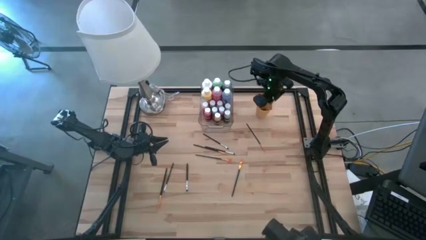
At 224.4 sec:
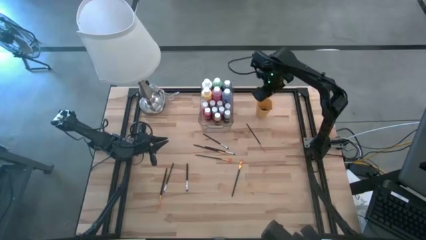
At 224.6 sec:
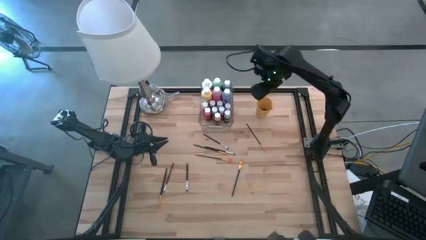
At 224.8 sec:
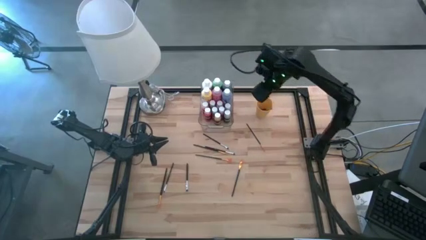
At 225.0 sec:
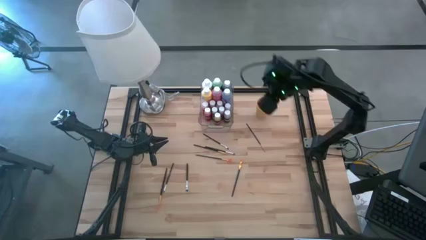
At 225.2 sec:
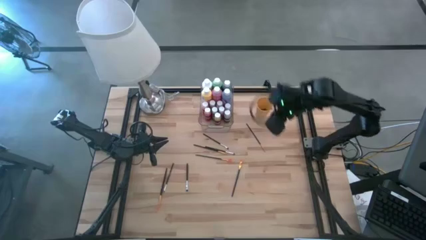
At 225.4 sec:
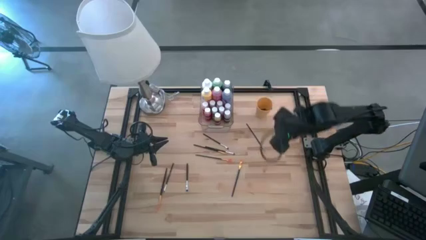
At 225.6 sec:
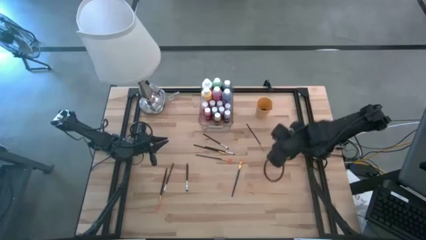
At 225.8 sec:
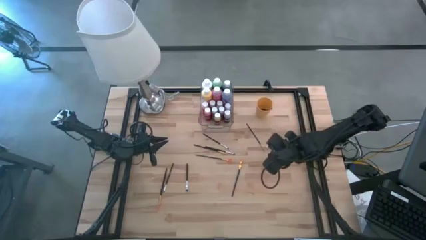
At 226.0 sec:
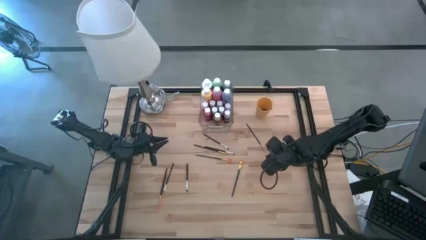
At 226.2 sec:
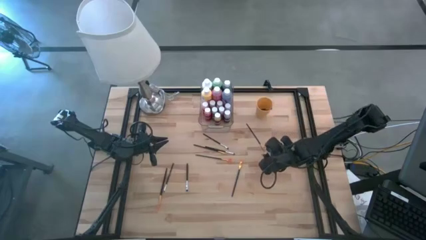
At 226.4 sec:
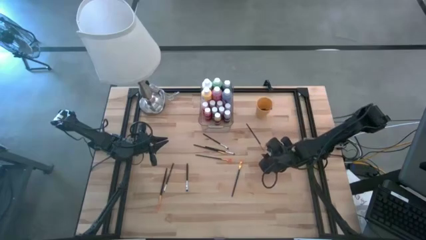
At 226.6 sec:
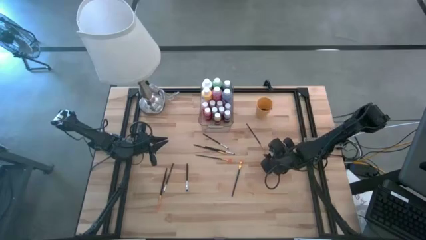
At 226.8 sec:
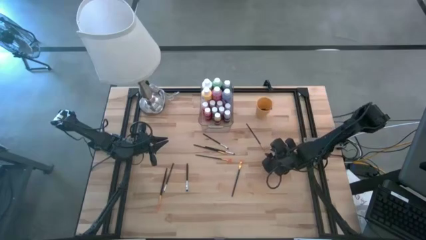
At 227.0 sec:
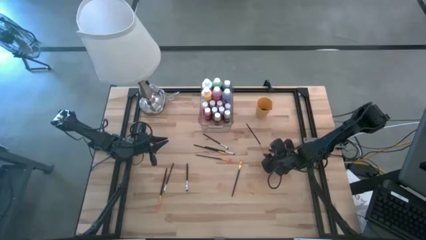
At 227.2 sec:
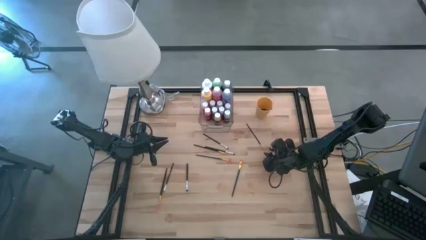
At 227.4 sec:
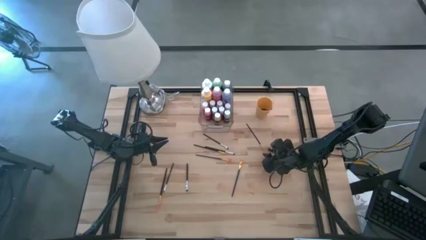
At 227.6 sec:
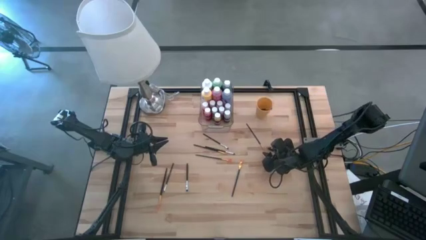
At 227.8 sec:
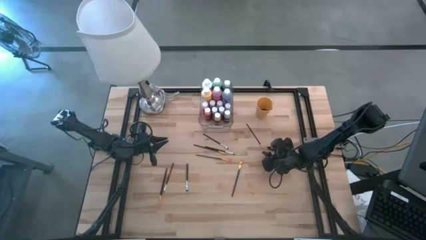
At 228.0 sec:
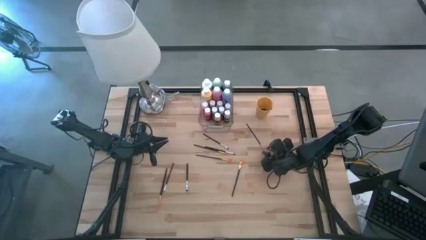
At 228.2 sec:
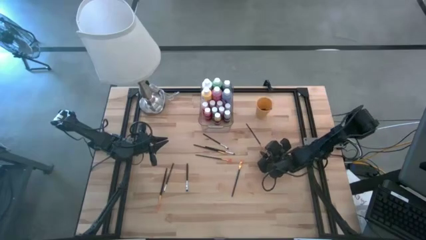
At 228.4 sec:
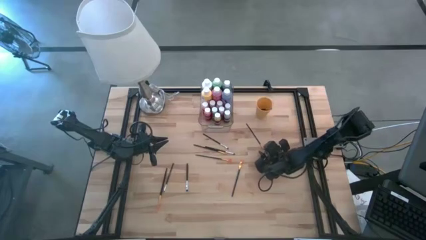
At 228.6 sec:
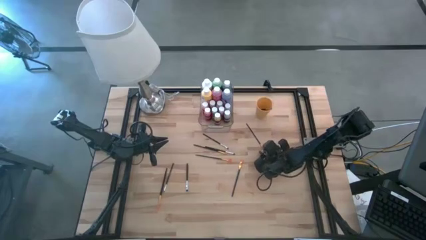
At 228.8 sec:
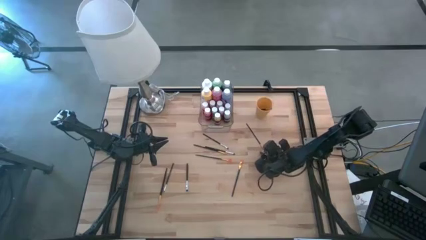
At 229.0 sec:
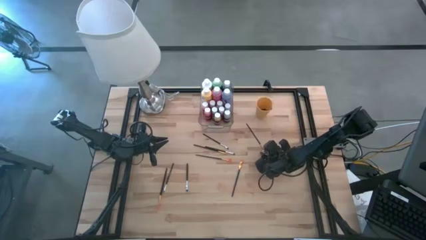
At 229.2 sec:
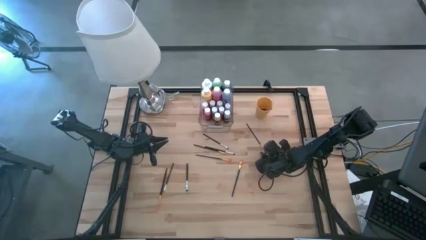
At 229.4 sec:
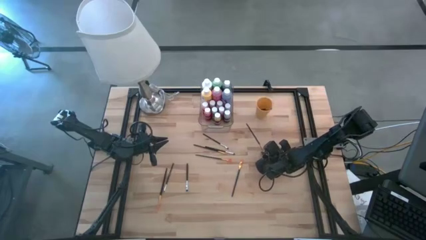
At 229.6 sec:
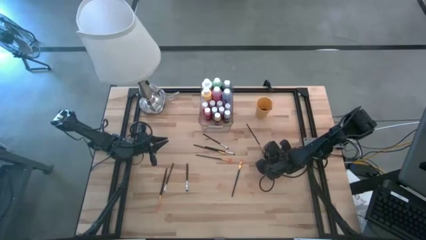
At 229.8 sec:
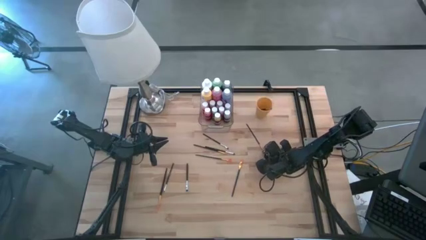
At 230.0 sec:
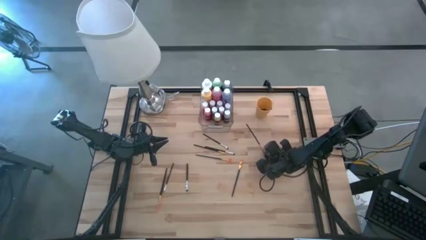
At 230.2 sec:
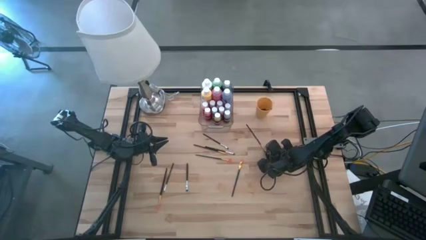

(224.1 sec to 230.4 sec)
Task: Pick & Place Paint Supplies
Put the gold paint brush into the cup

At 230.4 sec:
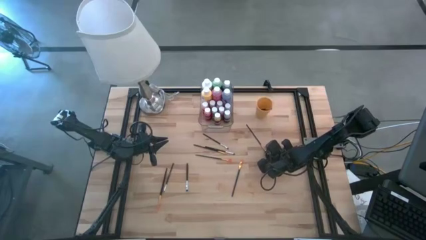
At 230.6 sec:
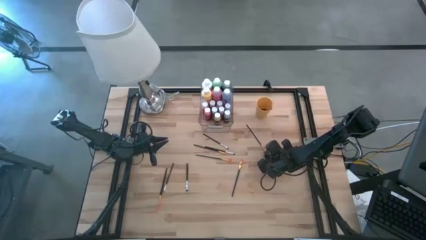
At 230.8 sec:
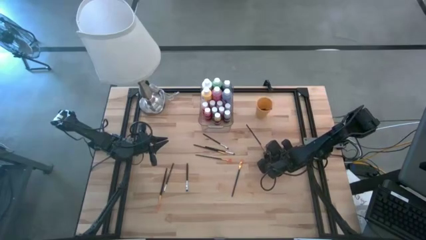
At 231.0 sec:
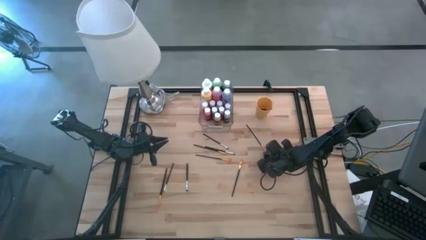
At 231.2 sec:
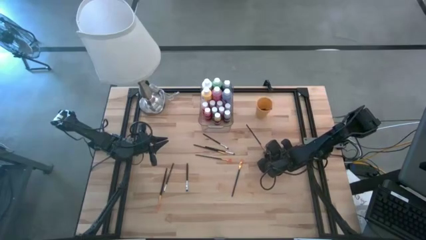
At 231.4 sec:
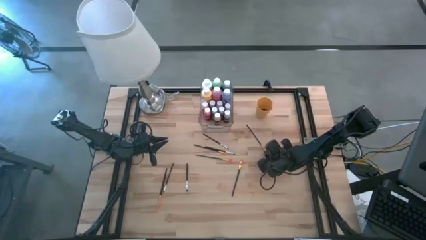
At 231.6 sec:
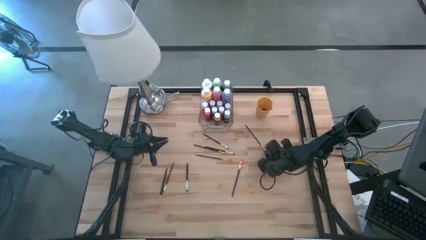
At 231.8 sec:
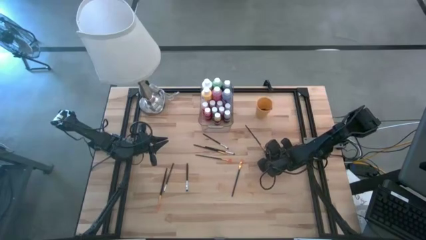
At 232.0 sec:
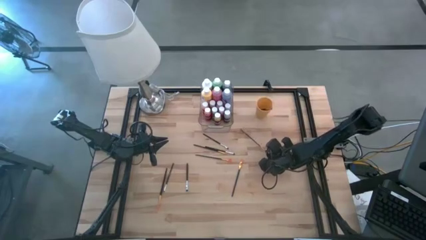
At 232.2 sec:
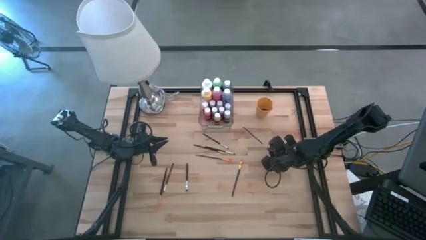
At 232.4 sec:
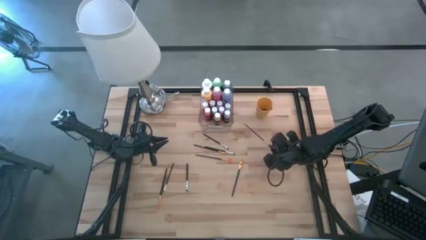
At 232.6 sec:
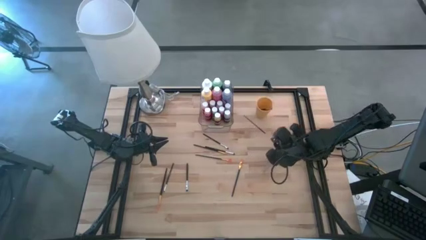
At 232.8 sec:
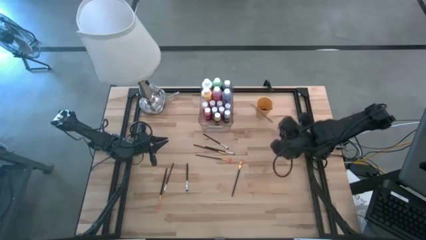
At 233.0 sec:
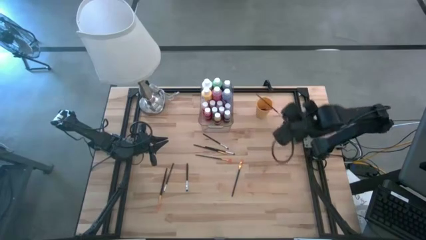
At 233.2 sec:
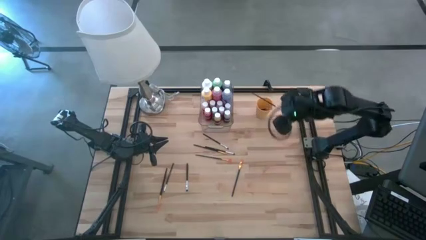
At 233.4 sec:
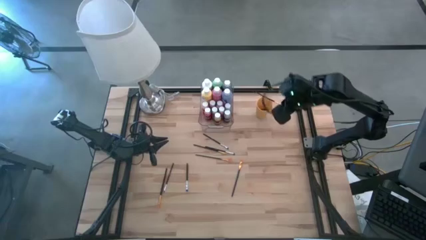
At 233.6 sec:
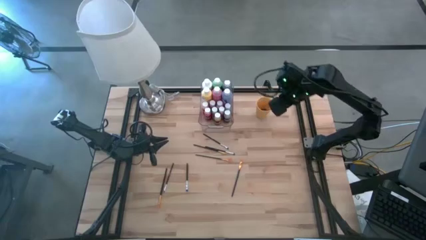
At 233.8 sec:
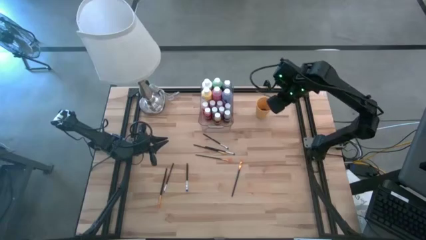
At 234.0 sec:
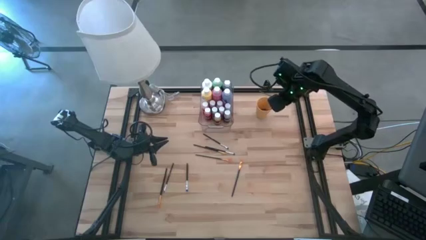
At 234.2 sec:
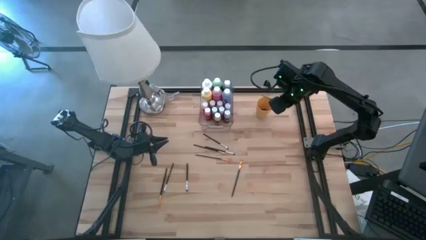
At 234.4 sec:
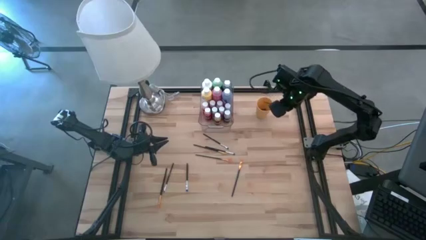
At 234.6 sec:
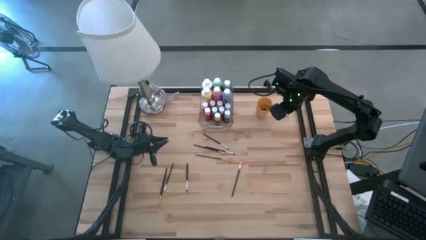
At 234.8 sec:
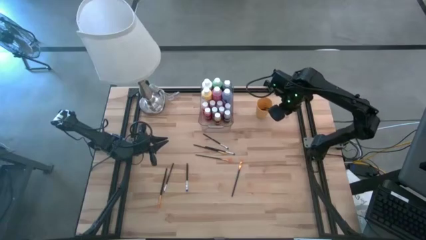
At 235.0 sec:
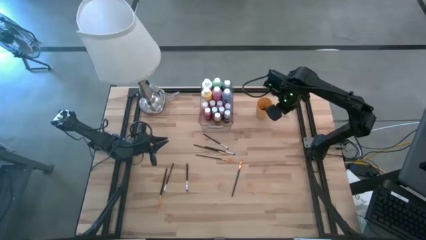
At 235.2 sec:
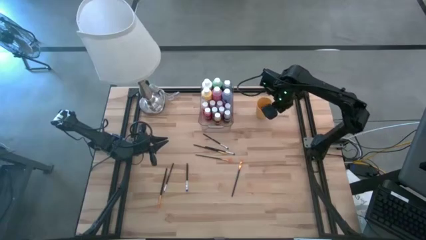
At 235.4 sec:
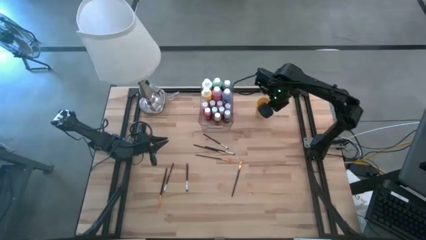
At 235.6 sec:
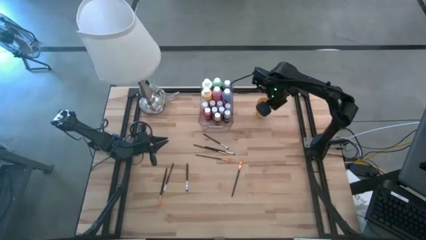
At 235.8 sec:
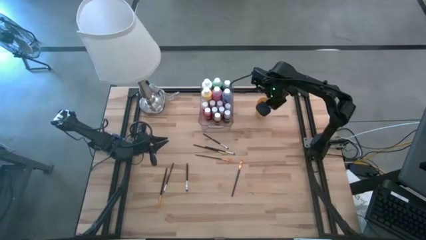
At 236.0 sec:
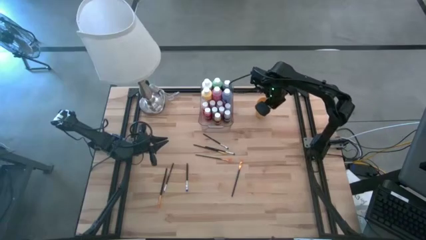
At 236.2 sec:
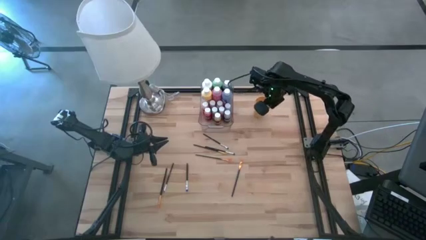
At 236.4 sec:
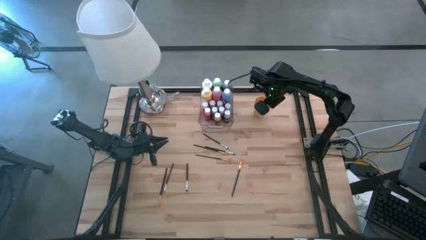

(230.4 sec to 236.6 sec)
Put the gold paint brush into the cup

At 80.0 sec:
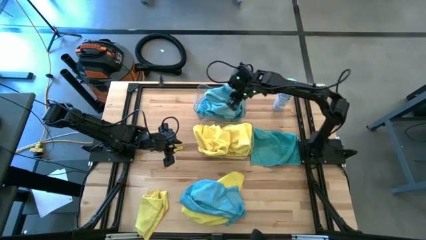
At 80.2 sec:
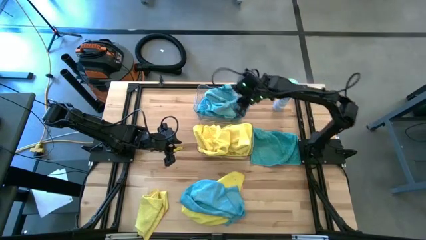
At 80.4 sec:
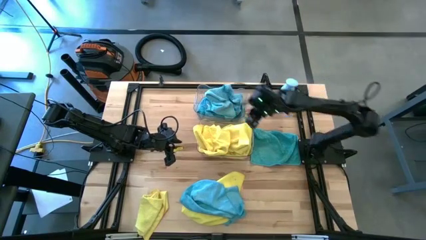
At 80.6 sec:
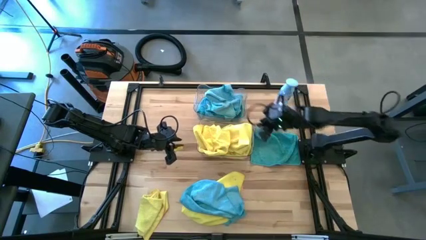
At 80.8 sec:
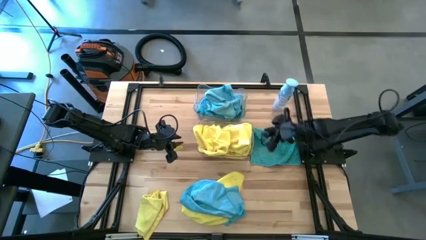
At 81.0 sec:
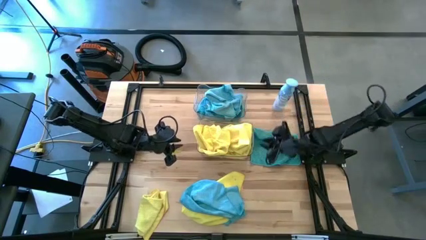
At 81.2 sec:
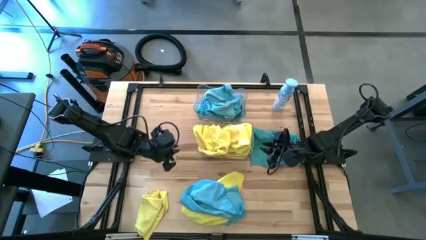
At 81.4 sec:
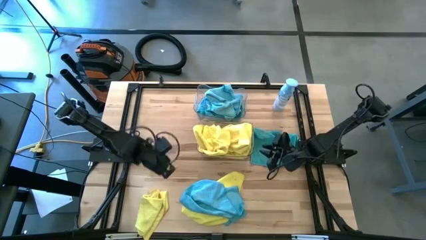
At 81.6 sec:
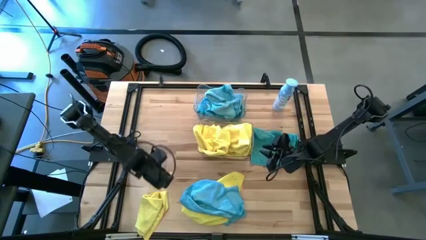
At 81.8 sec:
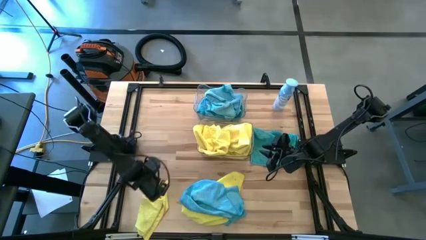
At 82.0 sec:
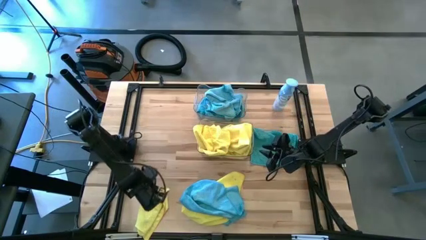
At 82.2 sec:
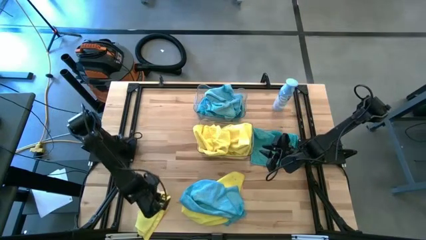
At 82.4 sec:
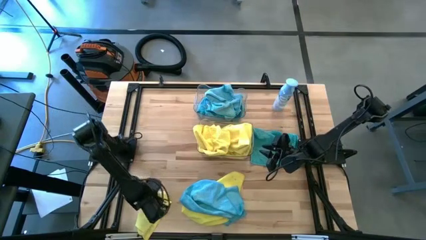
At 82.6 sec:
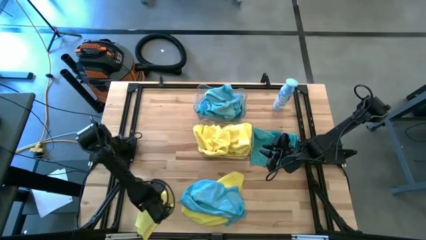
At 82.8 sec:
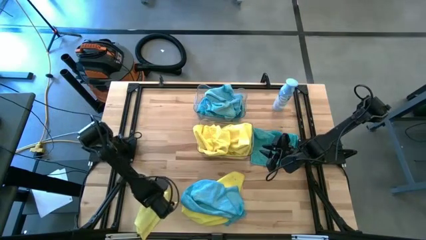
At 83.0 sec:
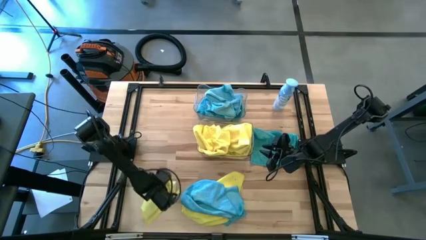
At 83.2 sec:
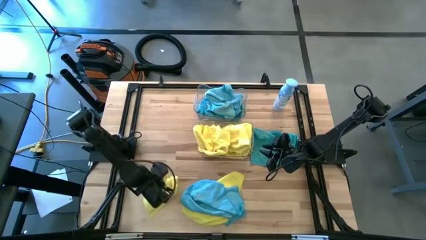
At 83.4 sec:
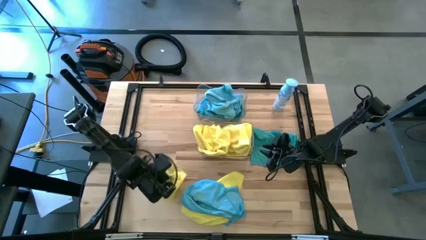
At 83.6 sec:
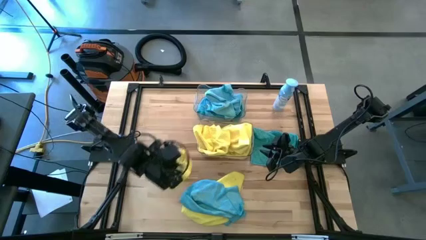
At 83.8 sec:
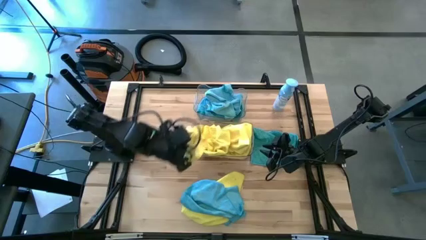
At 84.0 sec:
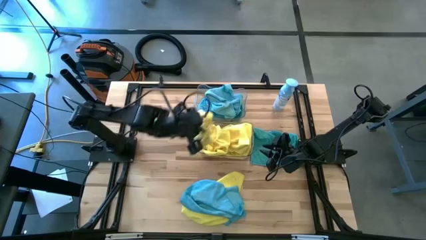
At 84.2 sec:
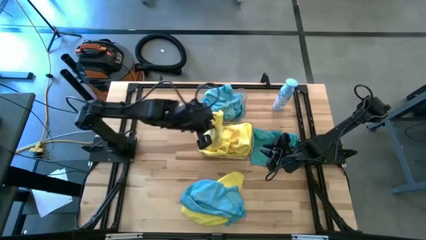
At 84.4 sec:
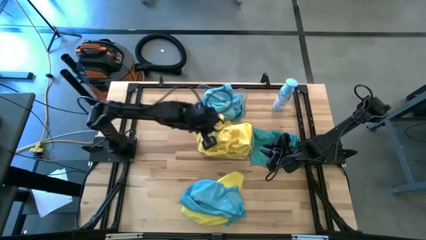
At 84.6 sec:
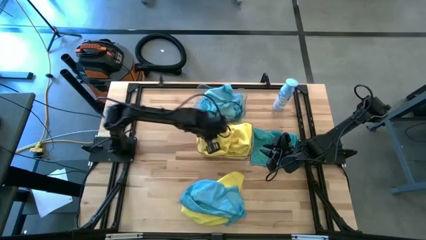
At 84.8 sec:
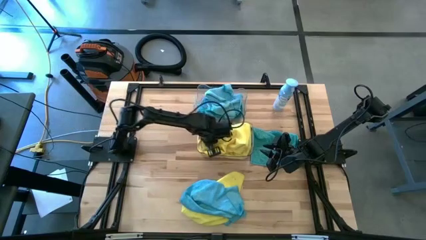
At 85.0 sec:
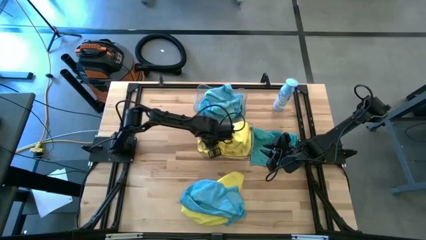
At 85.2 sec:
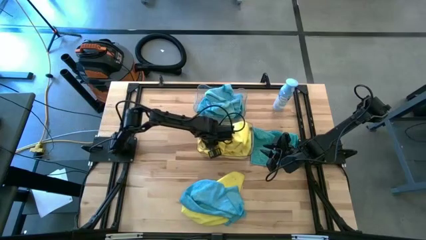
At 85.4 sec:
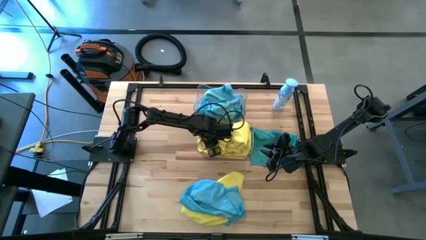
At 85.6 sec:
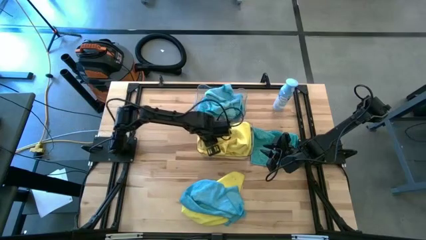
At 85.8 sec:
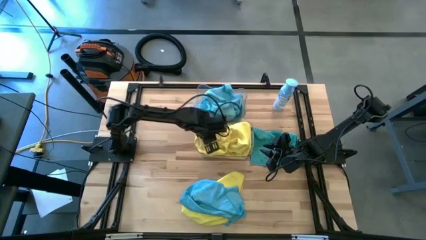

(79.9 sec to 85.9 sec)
Task: Sort microfiber towel by color & place in baskets
Put the yellow towel into the bottom transparent bin
